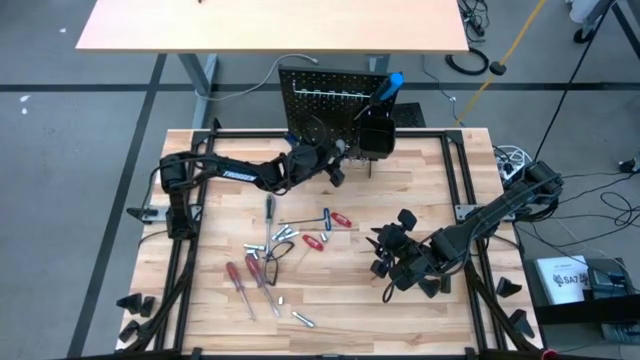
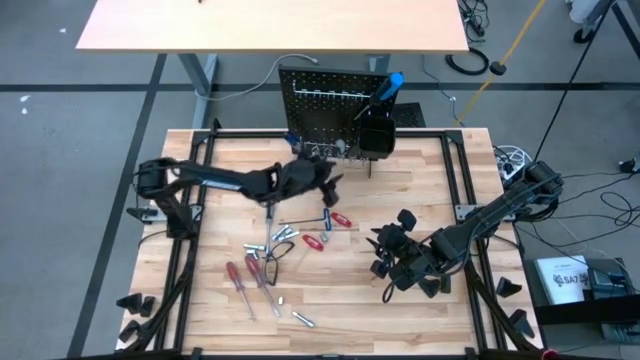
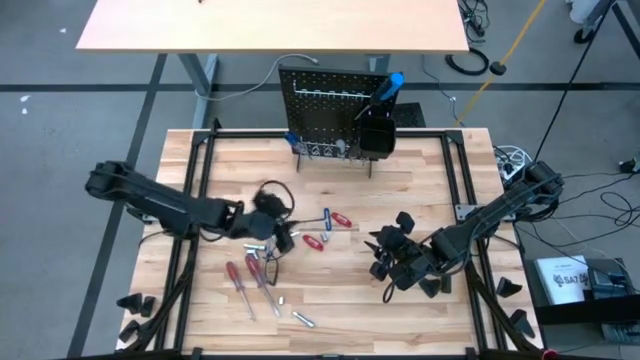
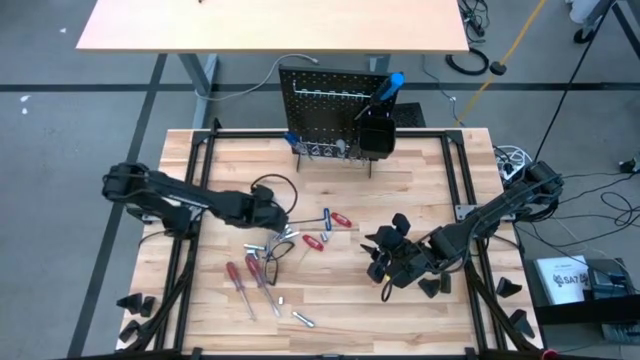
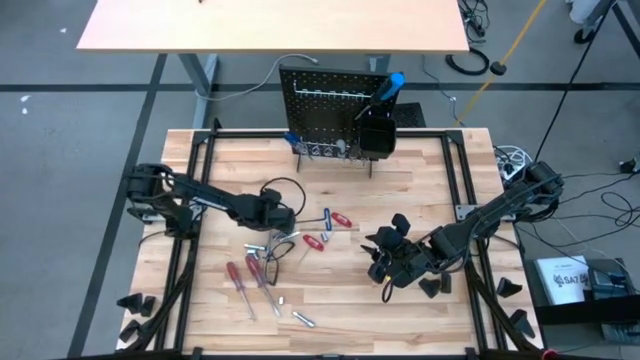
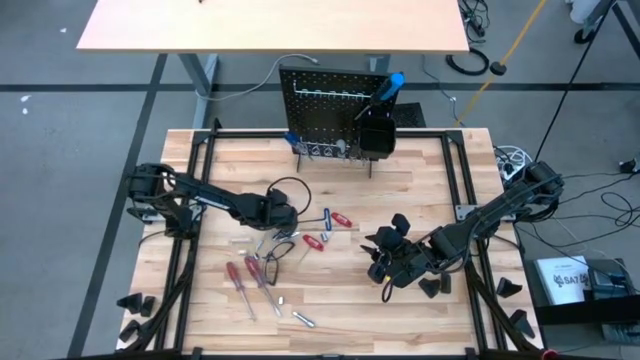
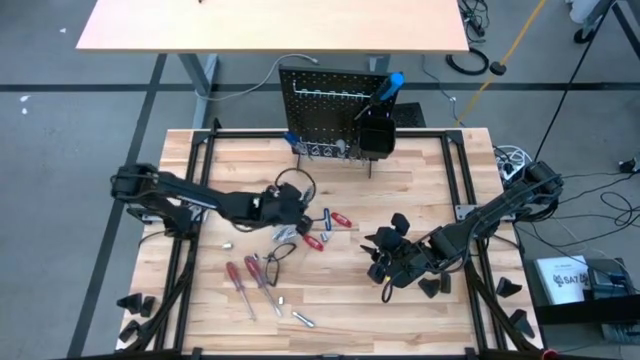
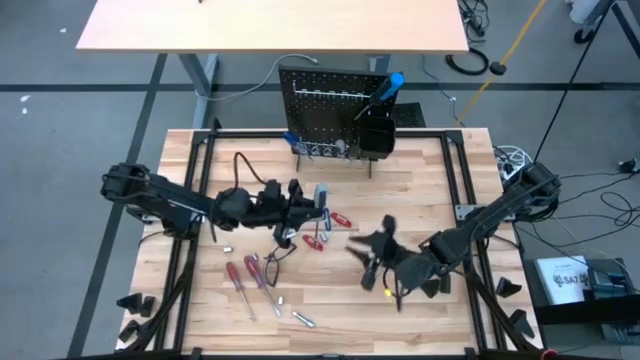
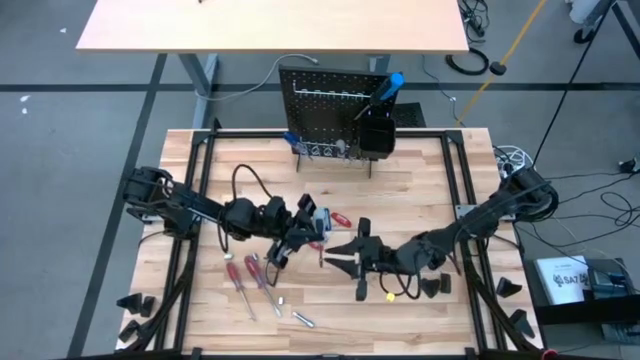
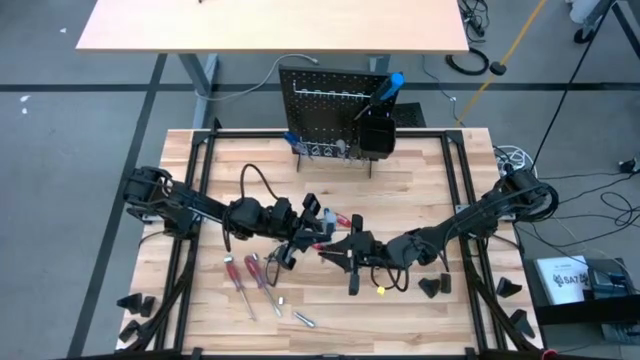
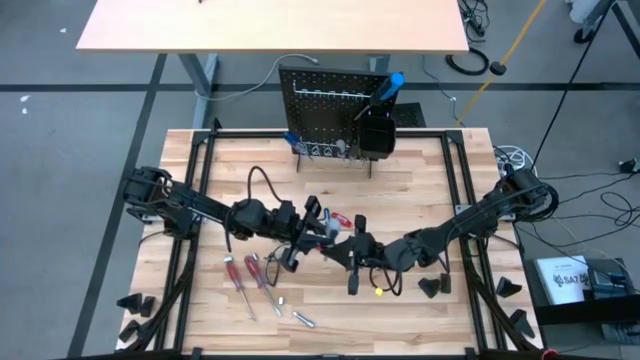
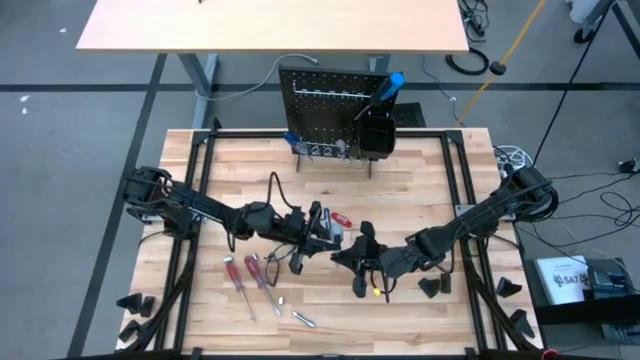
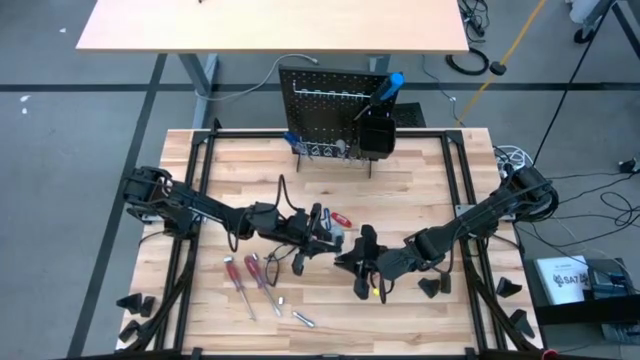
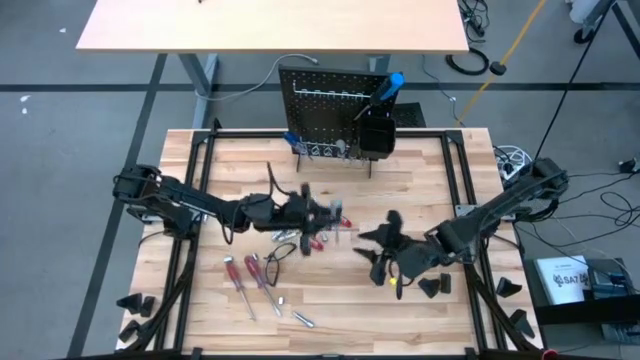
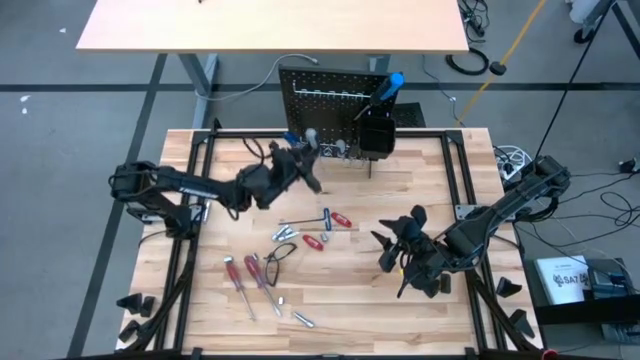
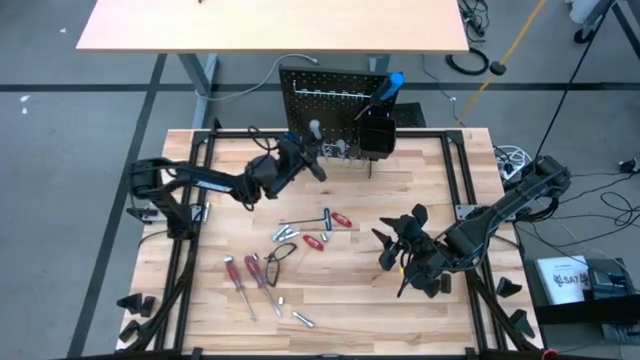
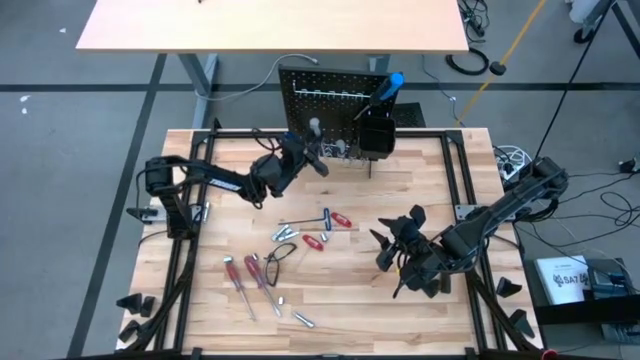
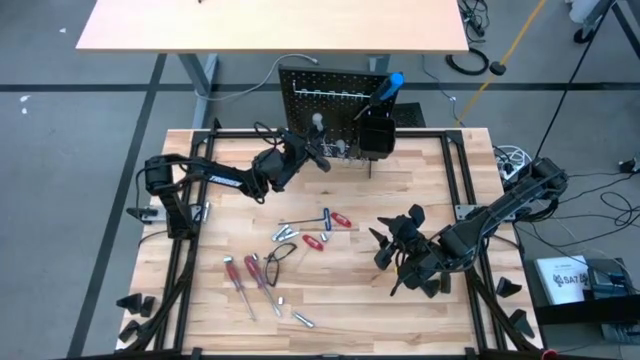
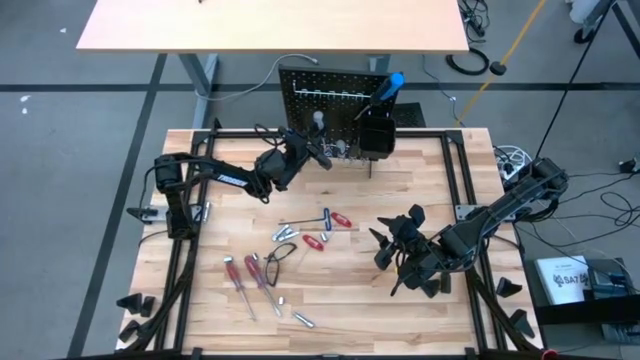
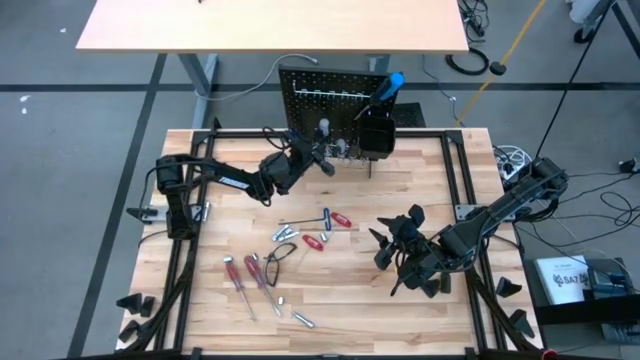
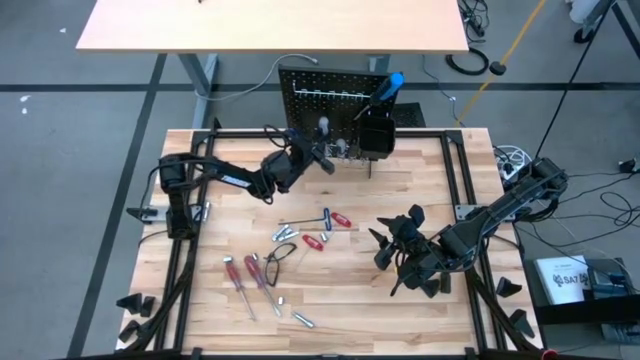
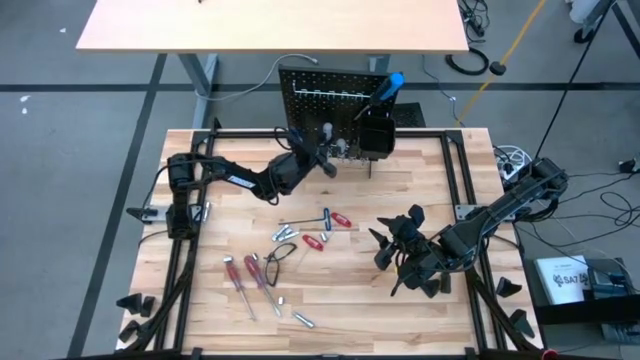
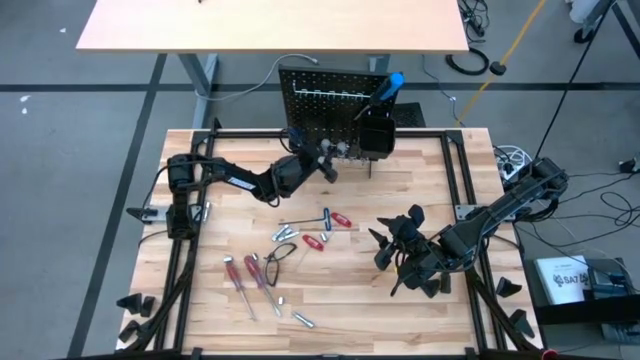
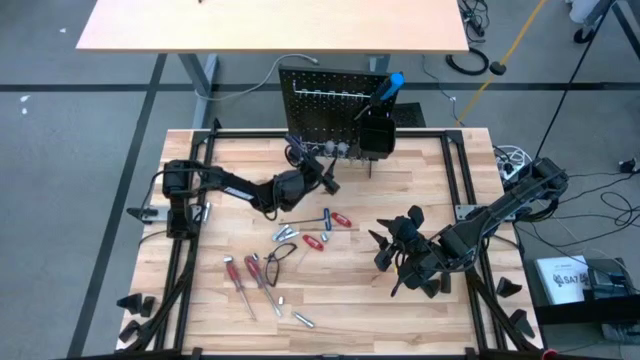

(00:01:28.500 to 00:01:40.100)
Task: Hang tools onto peg board
Hang the gray socket screwdriver onto the peg board

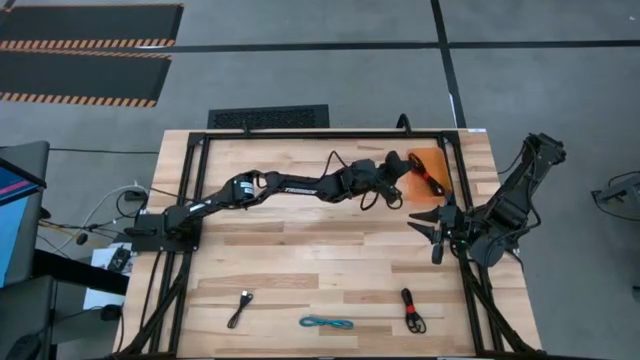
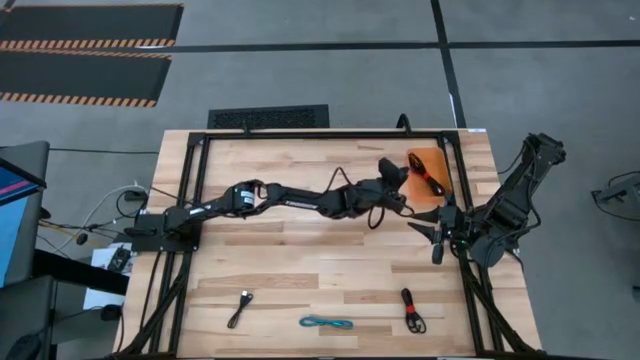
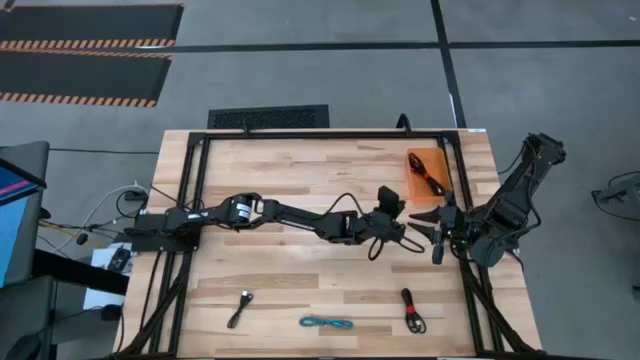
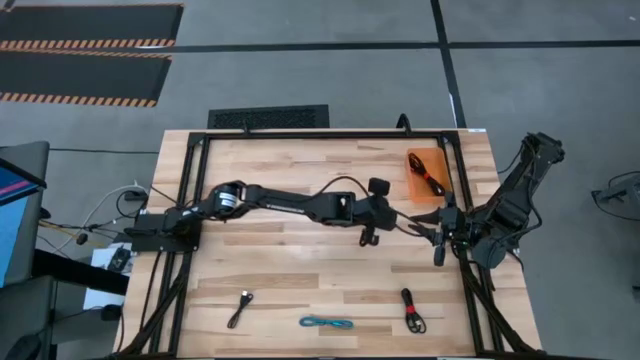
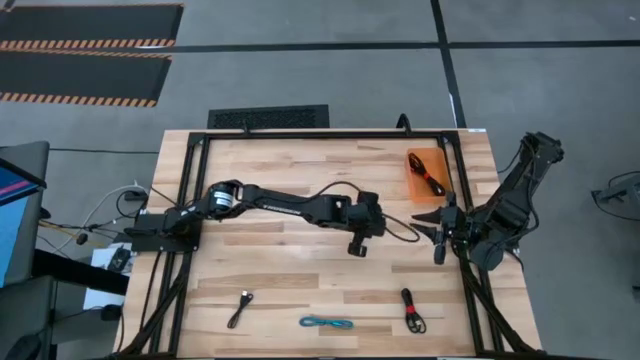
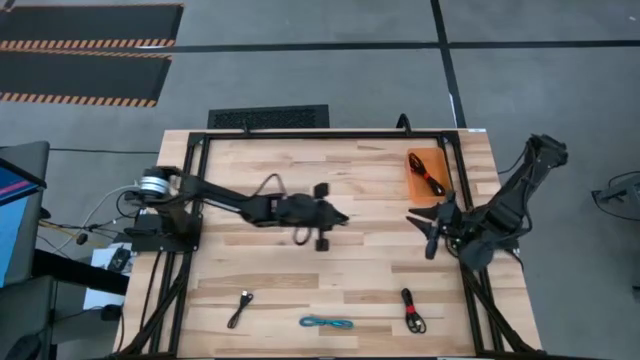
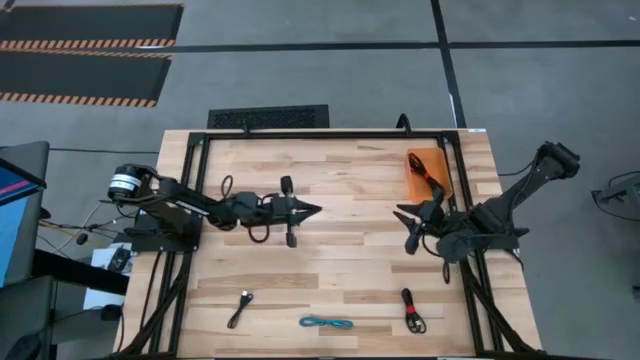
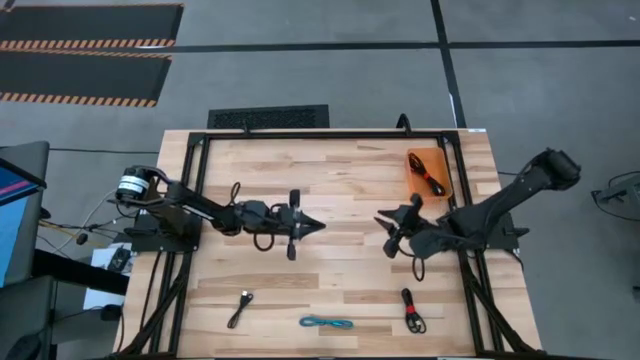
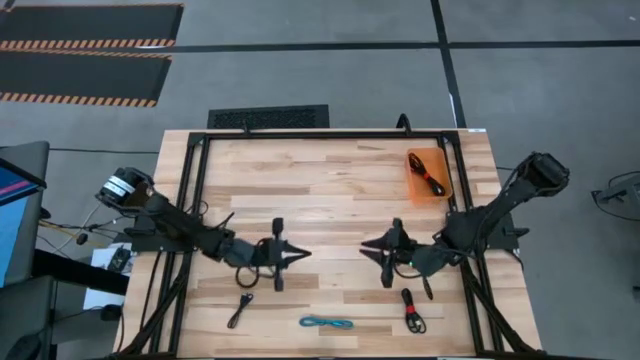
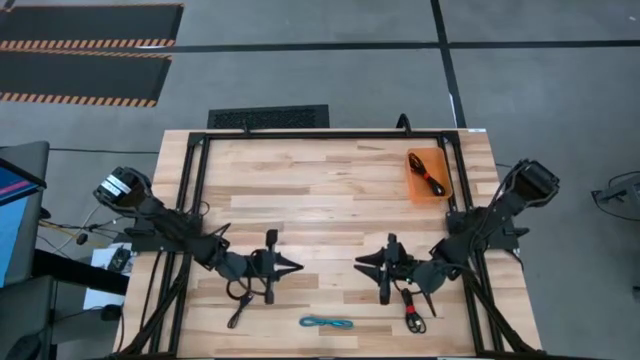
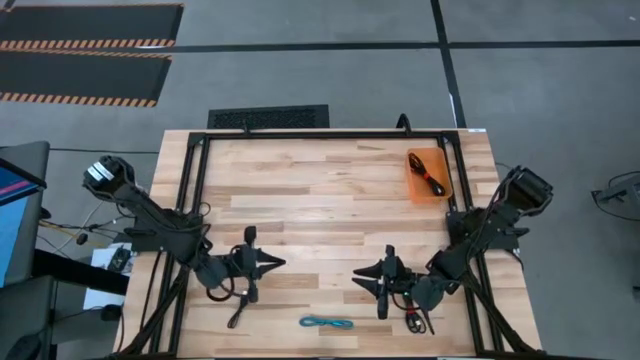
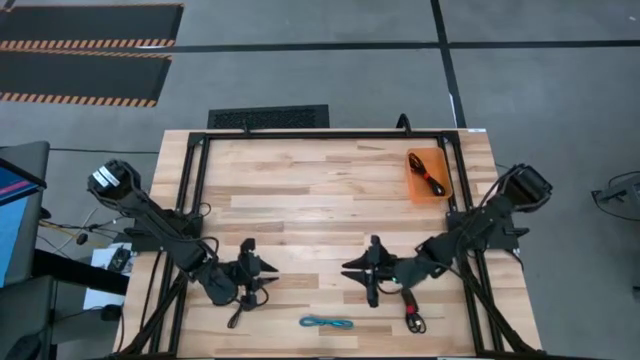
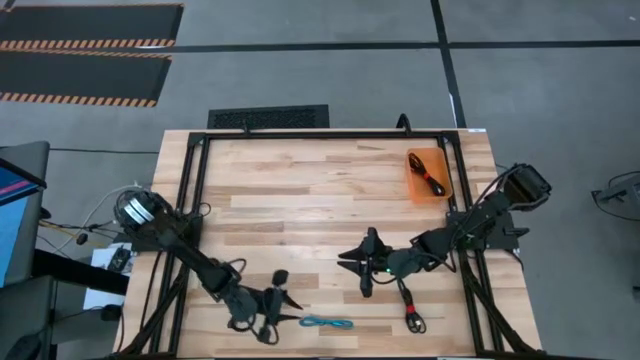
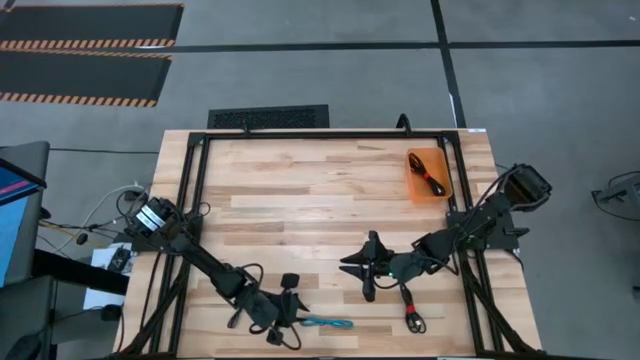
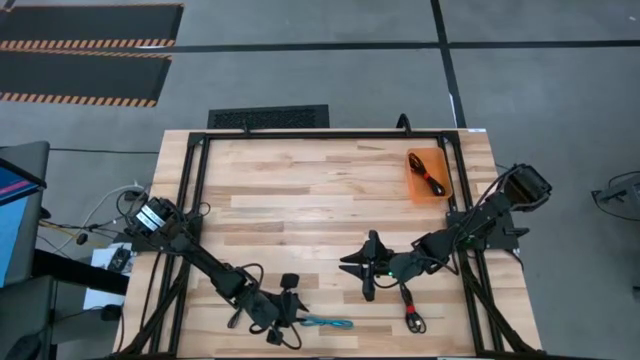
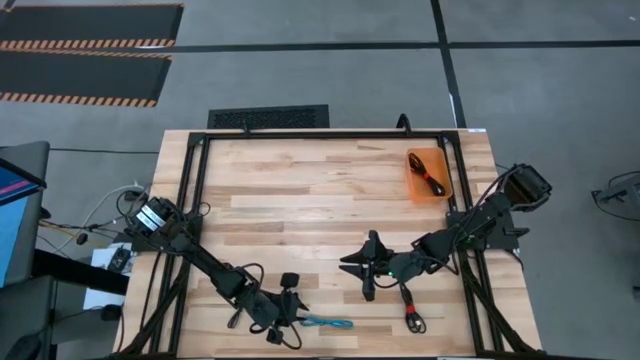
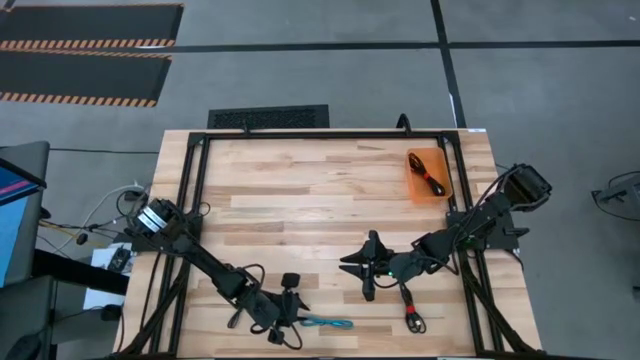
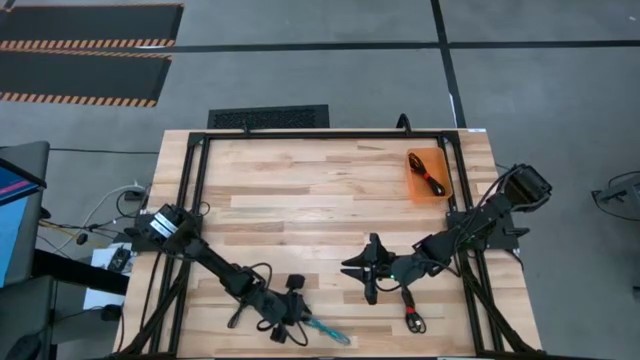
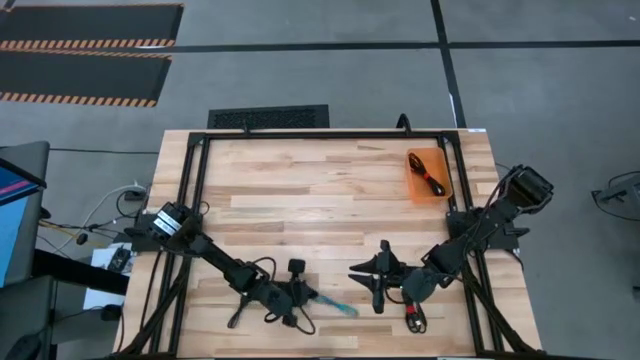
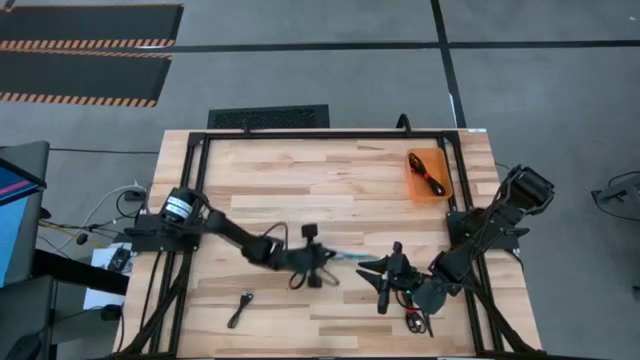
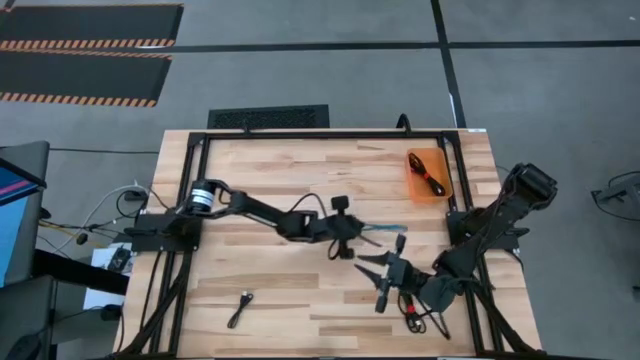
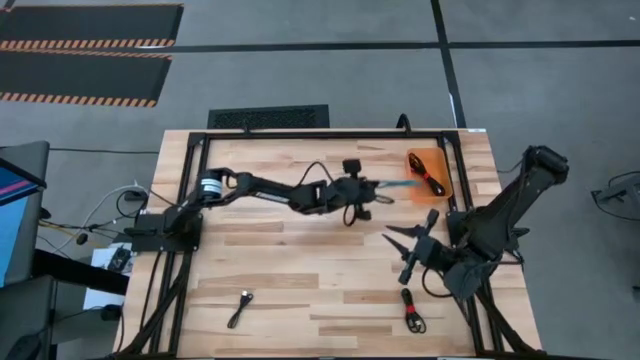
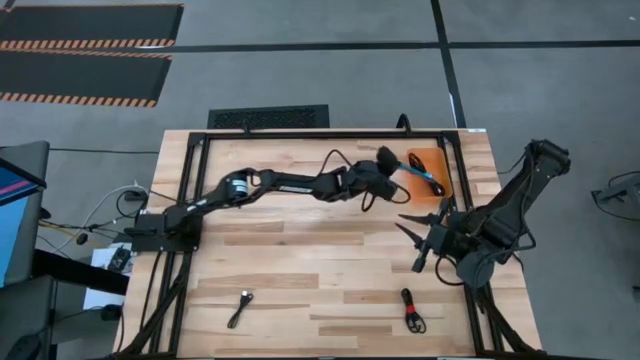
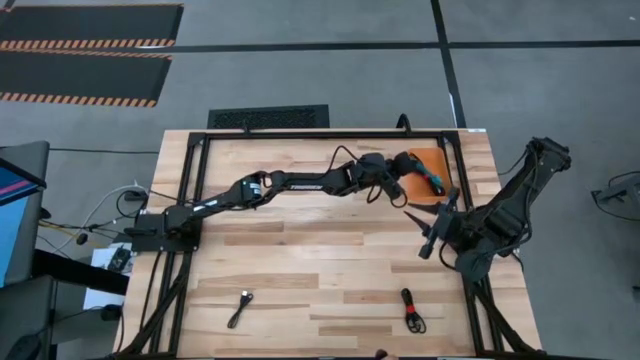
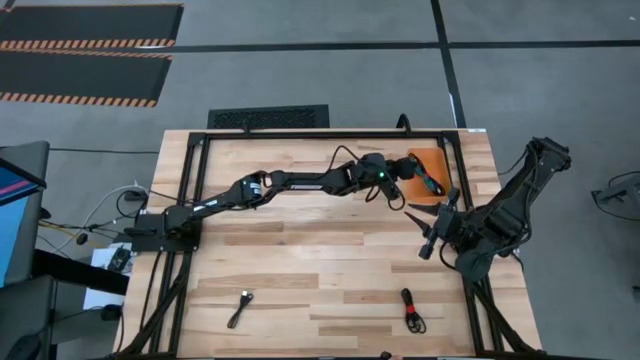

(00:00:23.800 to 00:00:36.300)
Task: Pick and place USB-C Cables
Put the black and blue charger cable into the orange bin
